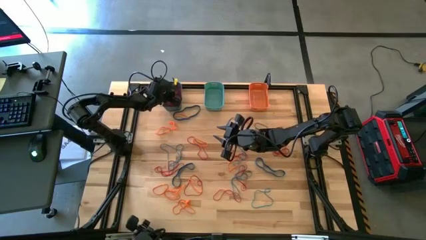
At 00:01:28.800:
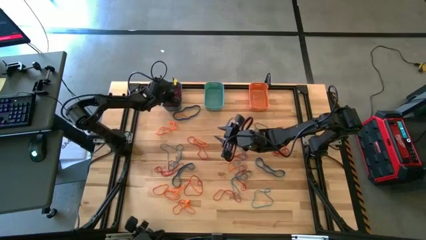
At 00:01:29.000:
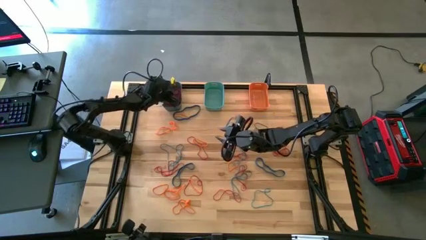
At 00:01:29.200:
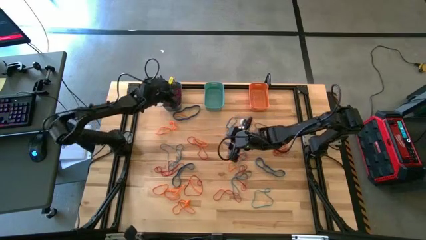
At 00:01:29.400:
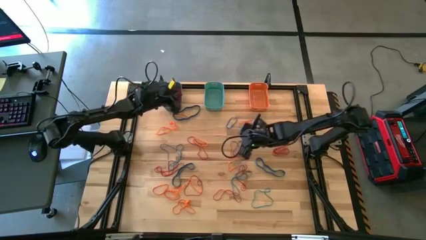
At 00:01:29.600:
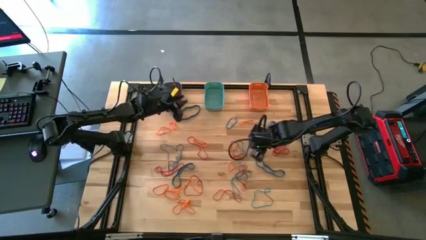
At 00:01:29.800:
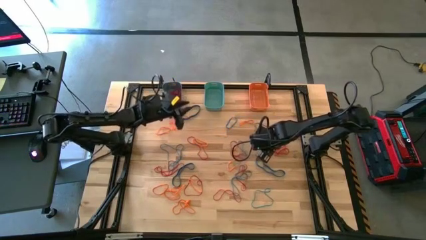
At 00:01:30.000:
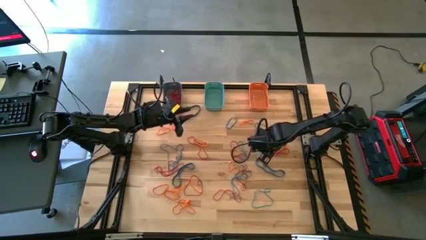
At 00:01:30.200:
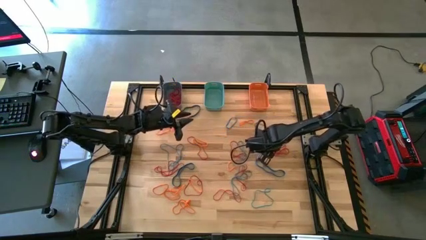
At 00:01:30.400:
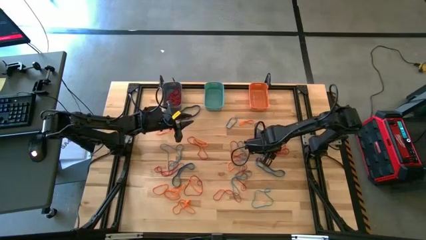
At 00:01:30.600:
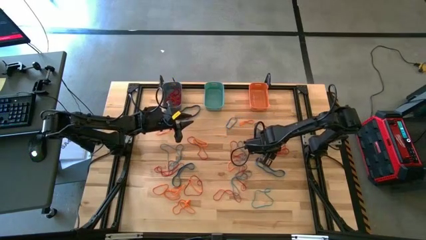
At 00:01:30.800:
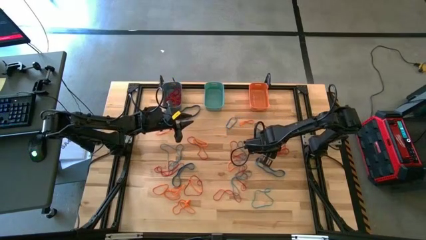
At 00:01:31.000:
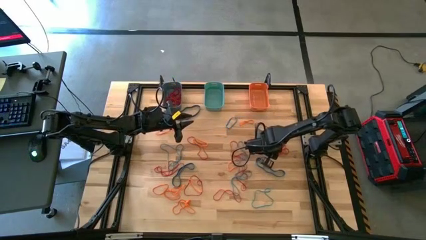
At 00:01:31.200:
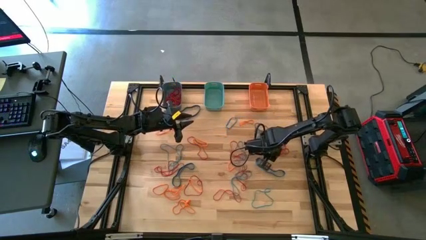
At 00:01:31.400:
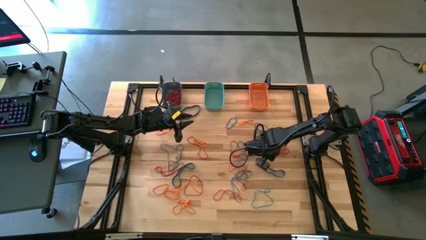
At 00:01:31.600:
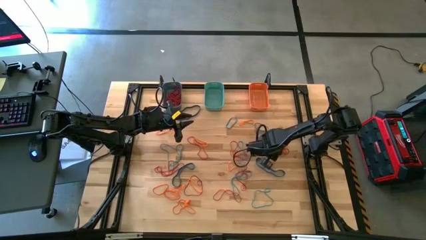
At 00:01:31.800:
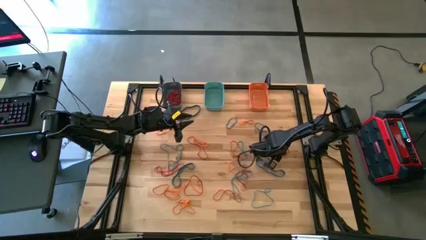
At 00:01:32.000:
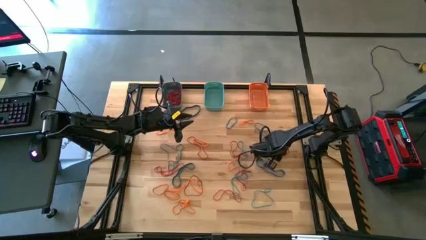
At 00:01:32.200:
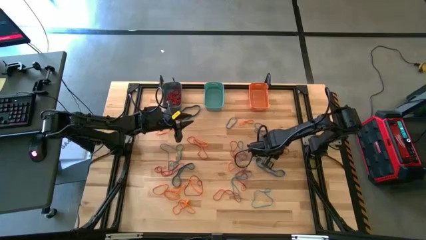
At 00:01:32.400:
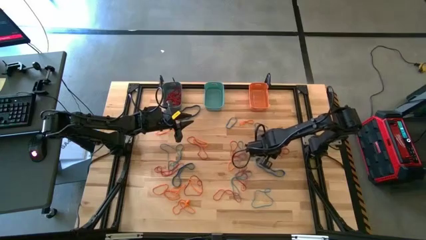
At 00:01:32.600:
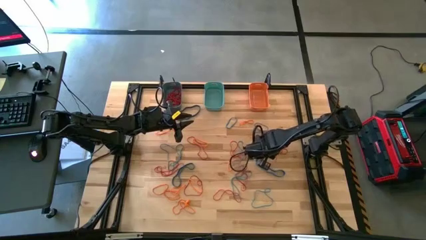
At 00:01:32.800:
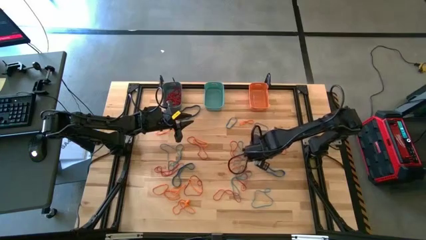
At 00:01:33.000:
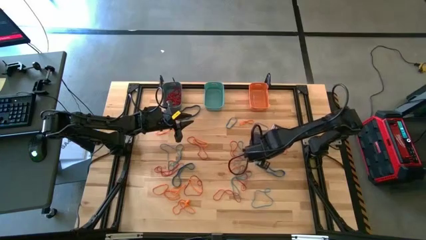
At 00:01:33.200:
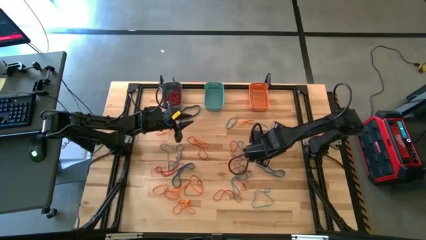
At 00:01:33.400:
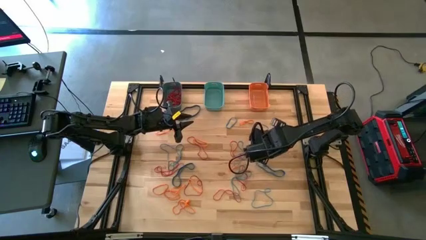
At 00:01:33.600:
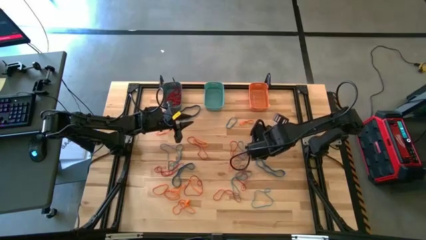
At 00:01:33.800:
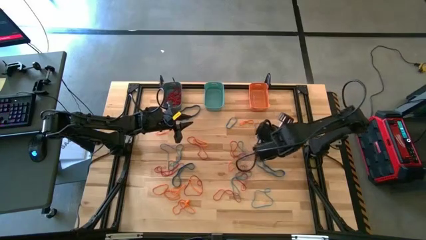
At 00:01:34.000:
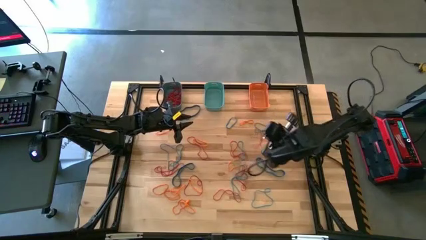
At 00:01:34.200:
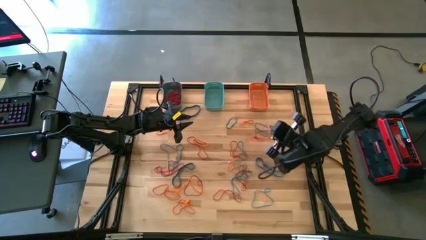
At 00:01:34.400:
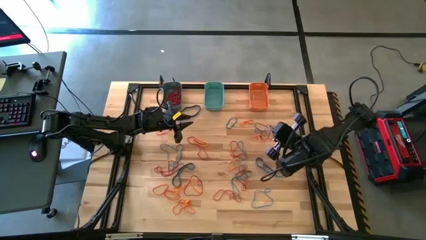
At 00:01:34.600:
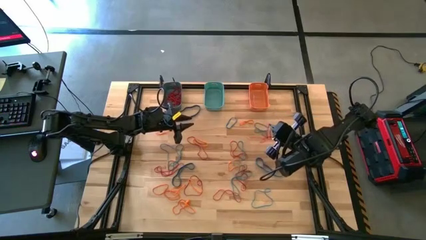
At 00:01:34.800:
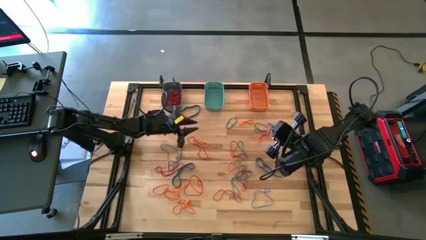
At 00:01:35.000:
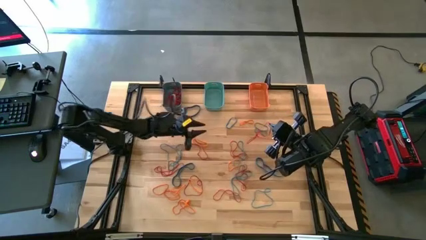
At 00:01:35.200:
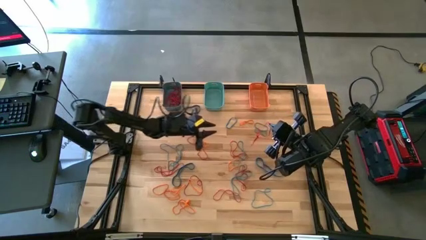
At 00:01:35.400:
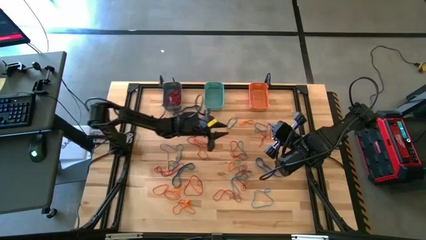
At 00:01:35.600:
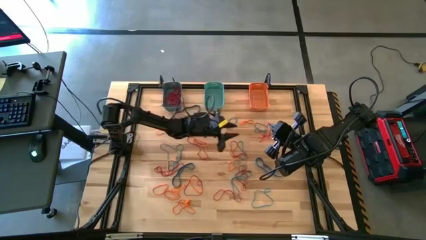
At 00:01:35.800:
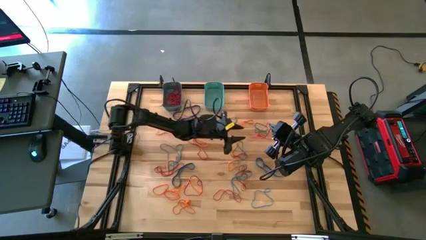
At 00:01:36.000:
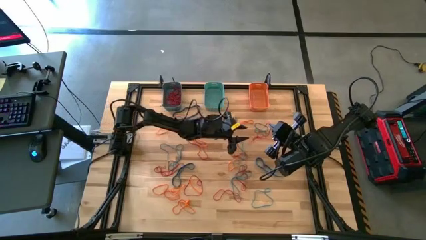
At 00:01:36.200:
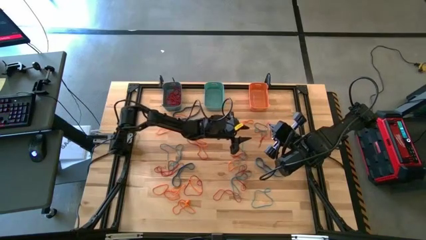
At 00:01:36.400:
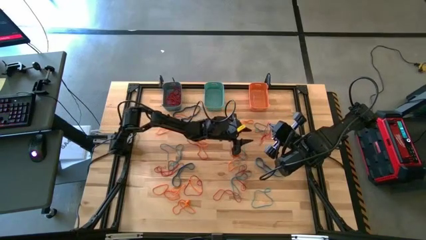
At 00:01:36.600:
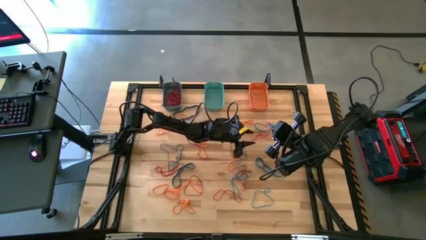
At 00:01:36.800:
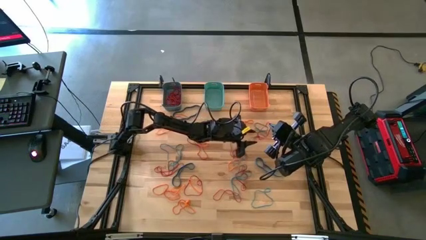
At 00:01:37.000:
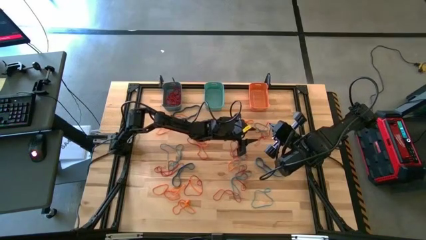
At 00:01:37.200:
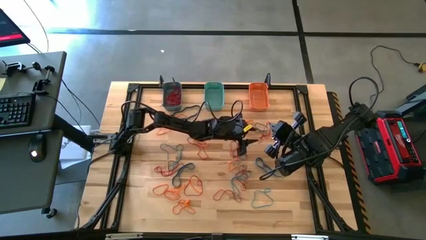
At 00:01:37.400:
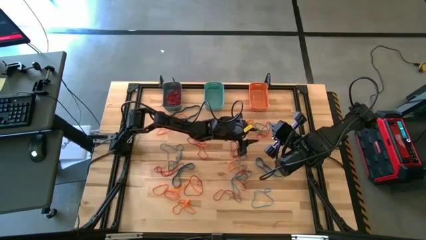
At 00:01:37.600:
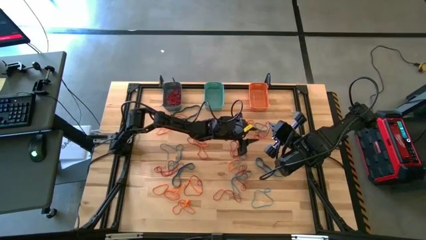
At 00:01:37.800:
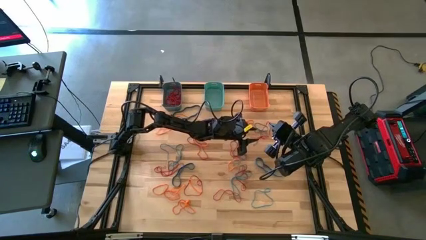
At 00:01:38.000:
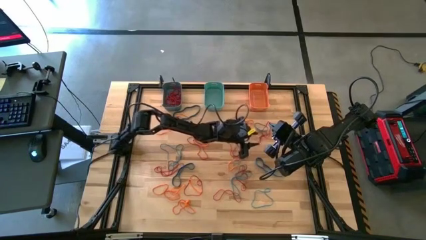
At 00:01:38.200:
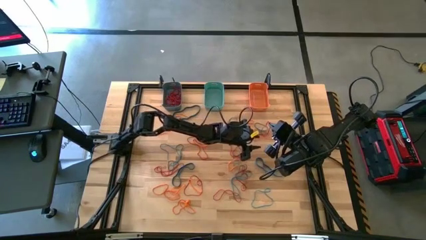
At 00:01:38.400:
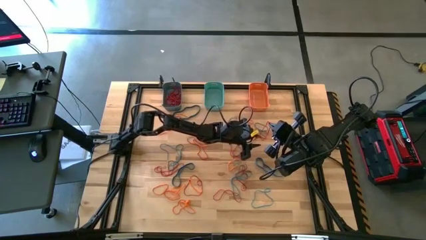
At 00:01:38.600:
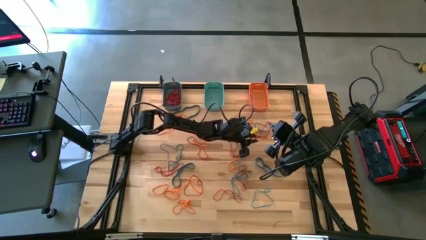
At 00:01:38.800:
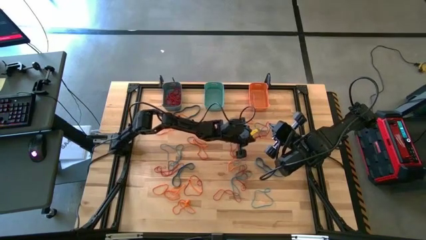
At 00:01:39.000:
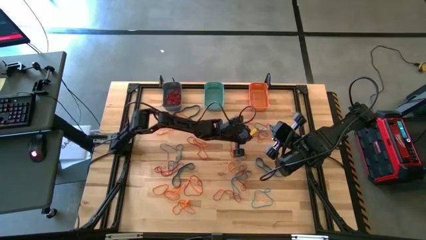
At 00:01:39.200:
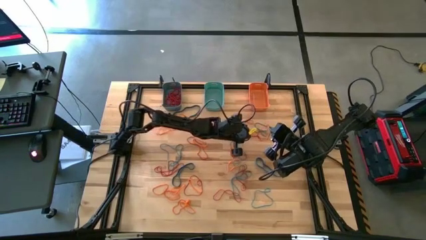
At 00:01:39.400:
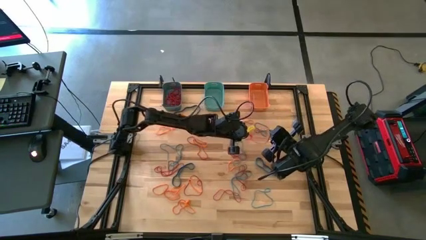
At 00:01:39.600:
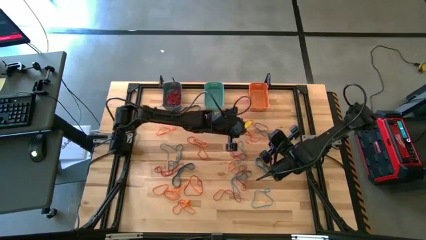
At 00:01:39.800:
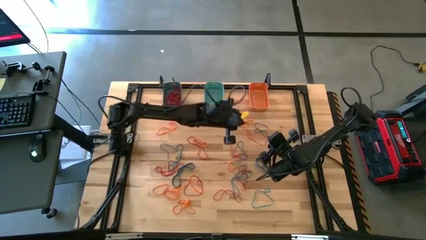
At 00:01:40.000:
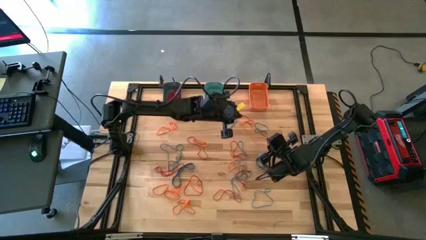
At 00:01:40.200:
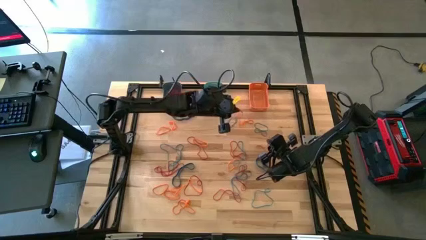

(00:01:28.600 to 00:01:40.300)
Task: Sort rubber bands into baskets
Put the red rubber band into the blue bin

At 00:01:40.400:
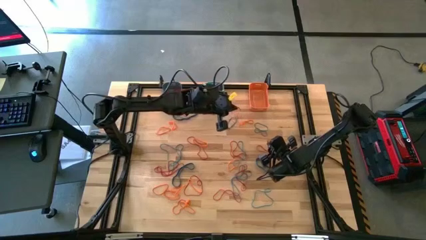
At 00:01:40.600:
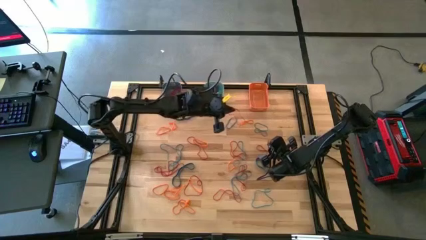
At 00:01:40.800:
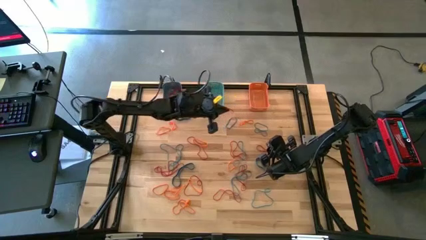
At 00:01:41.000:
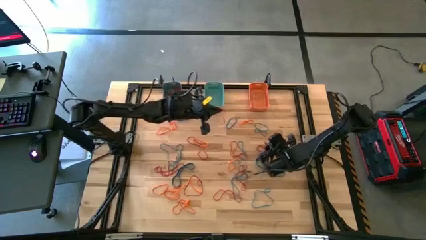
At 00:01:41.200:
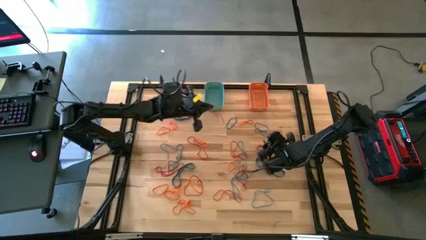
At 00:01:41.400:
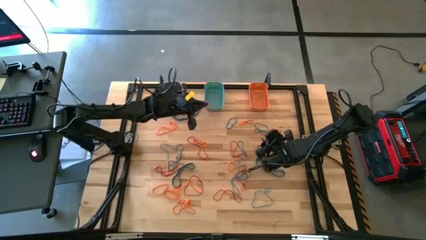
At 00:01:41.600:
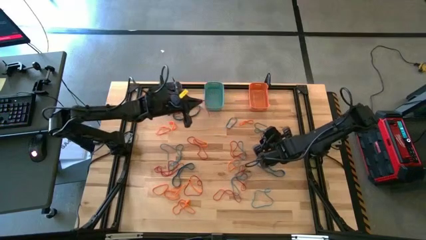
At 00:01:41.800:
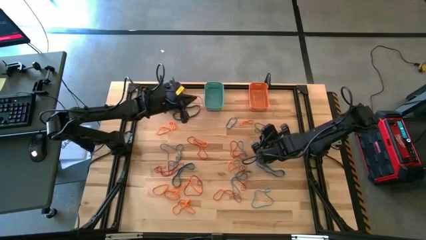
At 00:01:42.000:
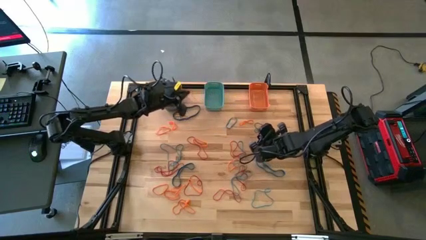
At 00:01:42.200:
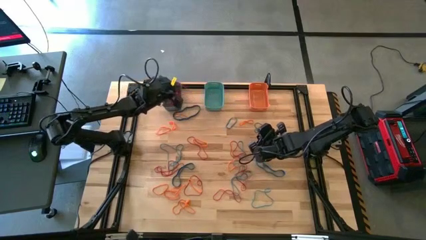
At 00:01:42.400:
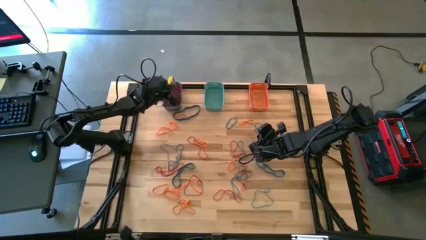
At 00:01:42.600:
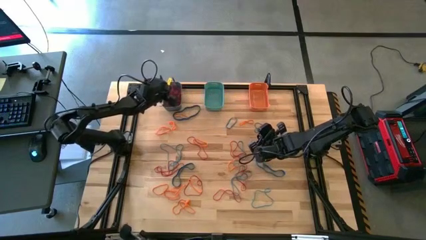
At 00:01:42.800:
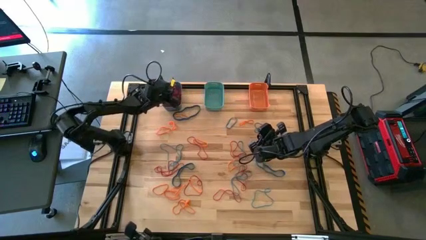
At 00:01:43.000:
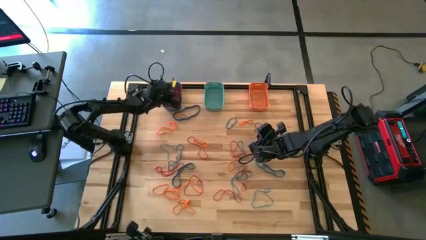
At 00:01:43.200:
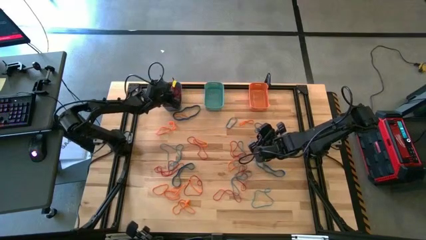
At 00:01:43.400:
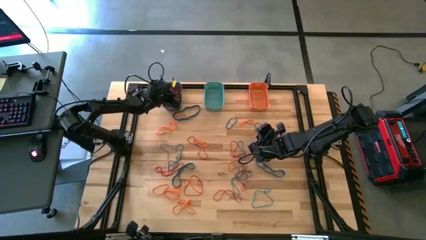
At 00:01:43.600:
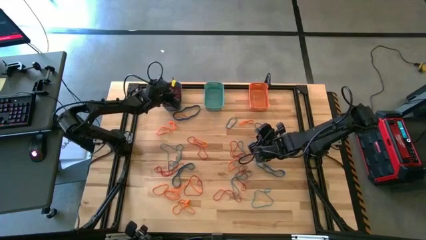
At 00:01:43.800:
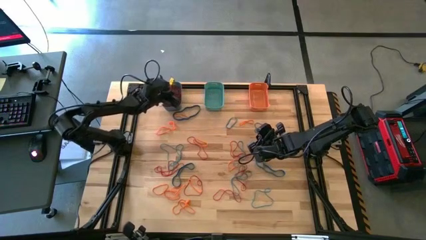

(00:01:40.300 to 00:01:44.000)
Put the red rubber band into the blue bin
